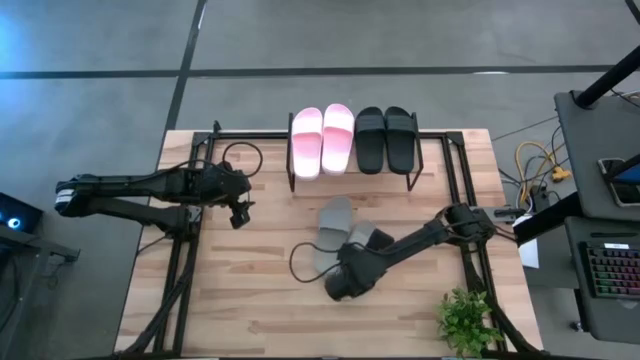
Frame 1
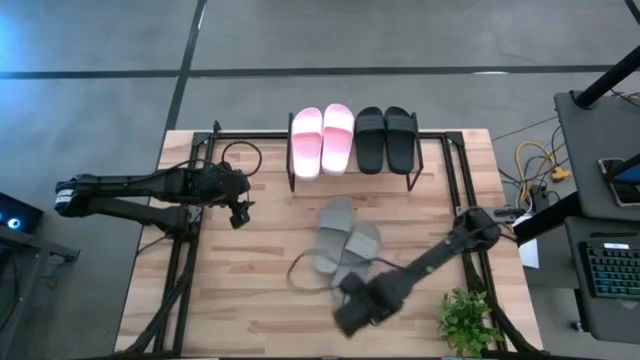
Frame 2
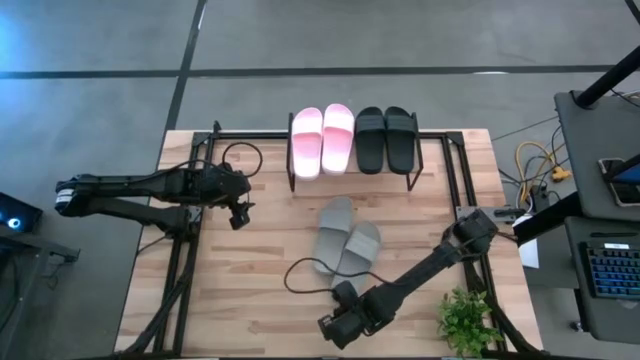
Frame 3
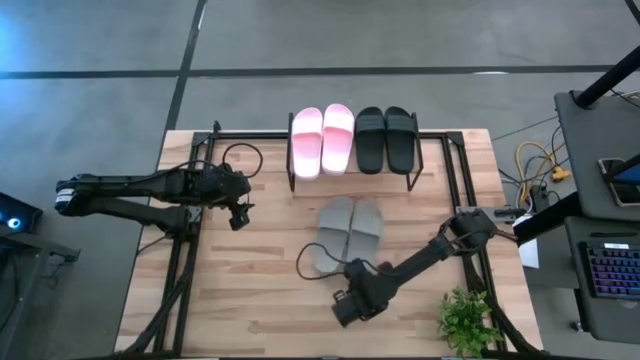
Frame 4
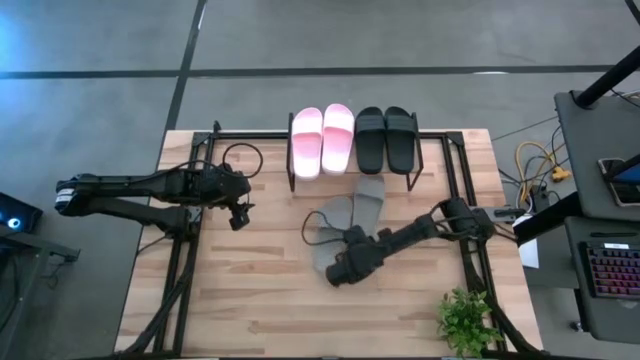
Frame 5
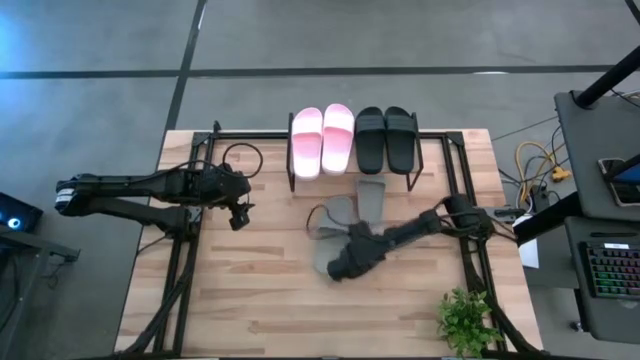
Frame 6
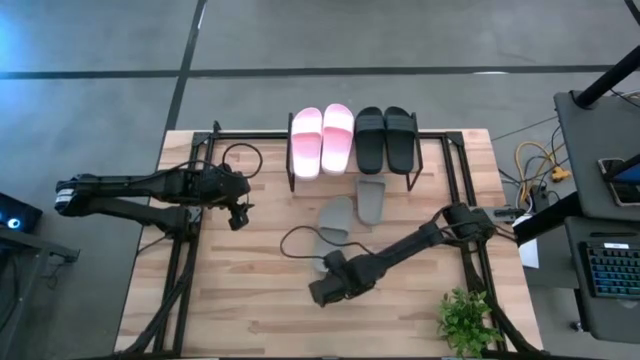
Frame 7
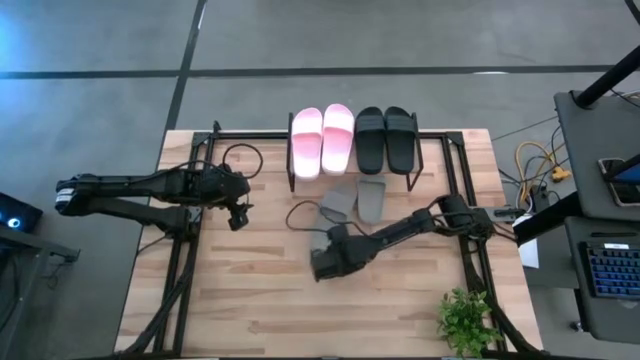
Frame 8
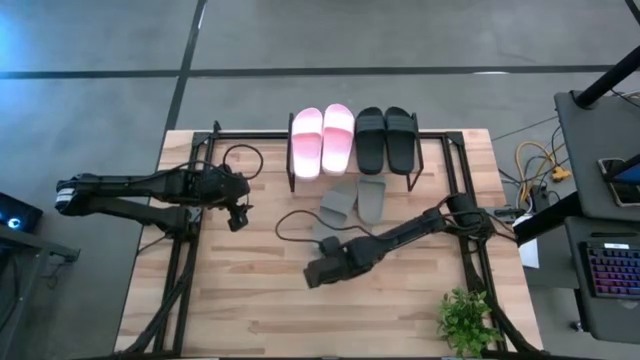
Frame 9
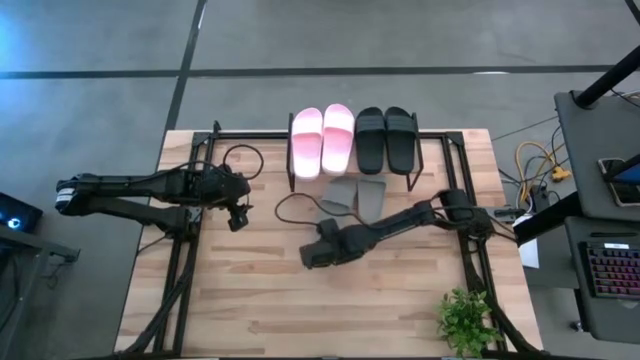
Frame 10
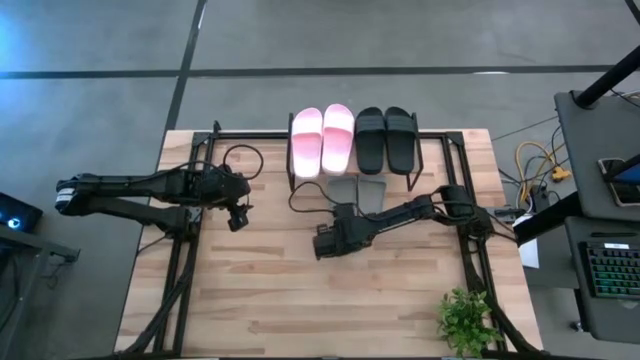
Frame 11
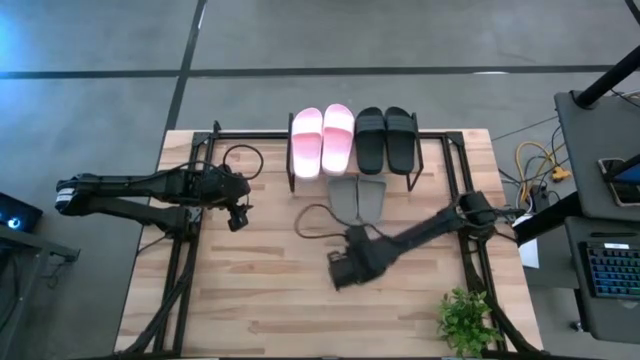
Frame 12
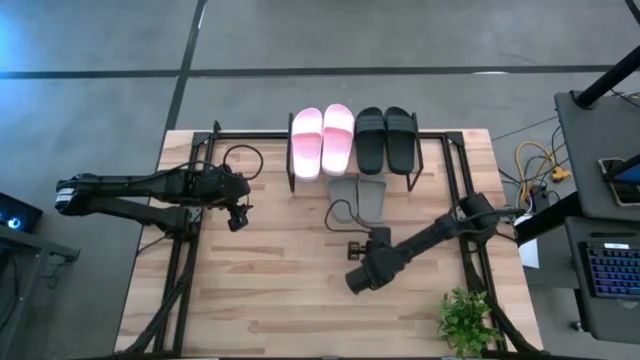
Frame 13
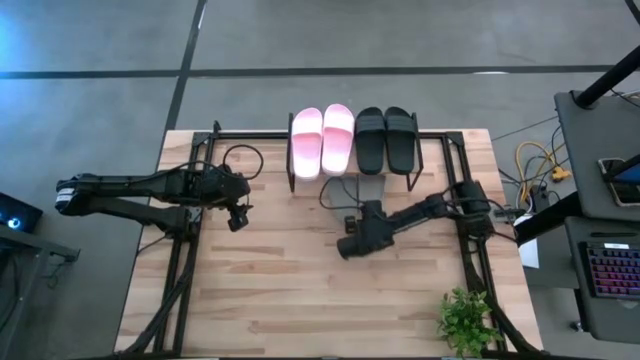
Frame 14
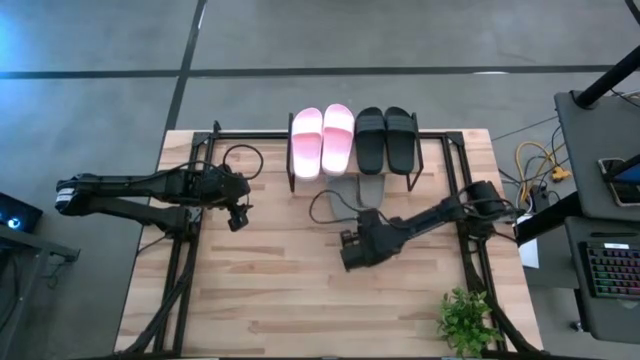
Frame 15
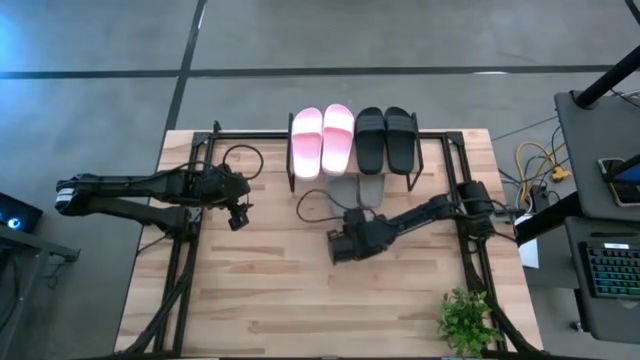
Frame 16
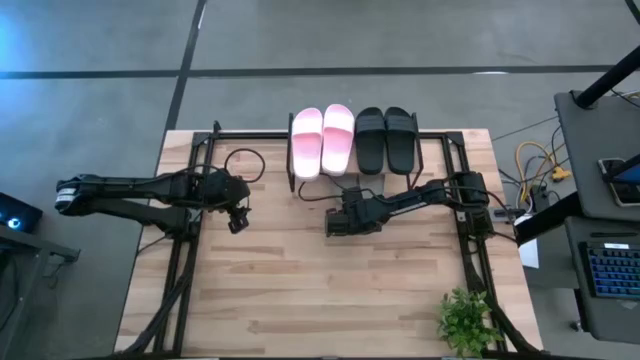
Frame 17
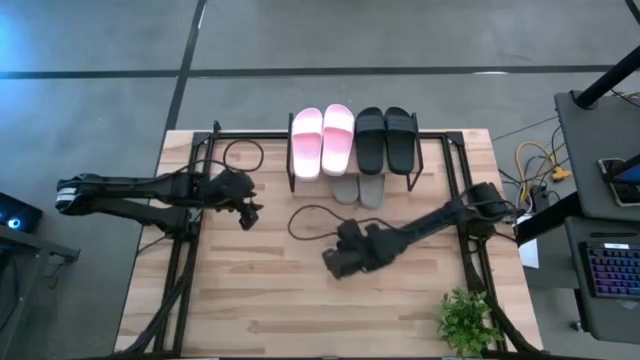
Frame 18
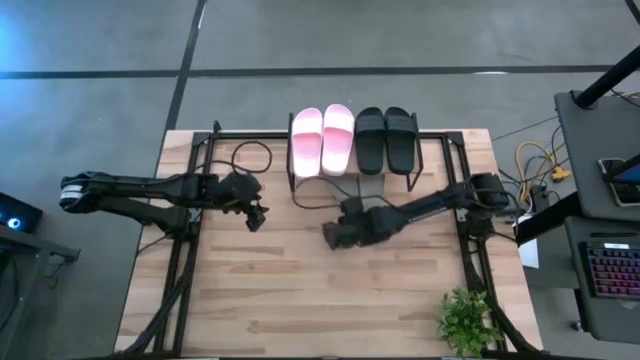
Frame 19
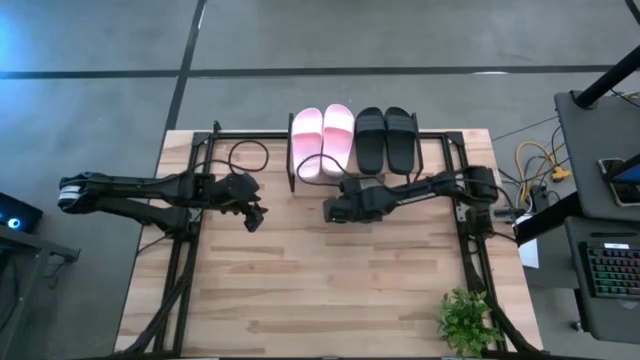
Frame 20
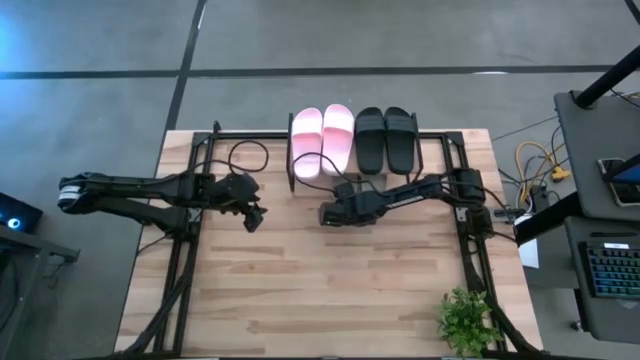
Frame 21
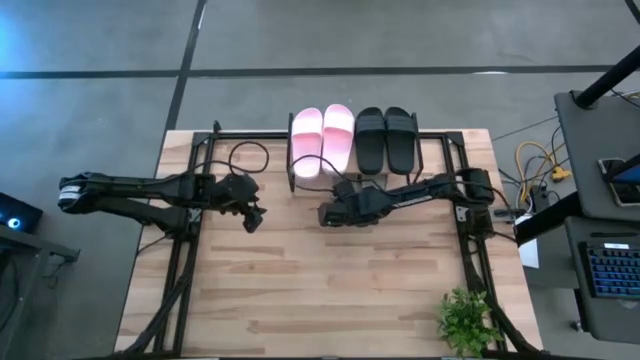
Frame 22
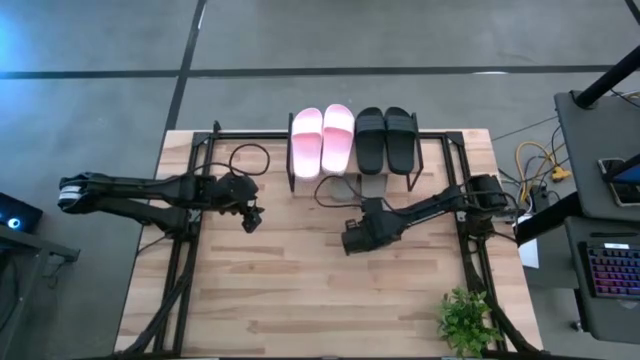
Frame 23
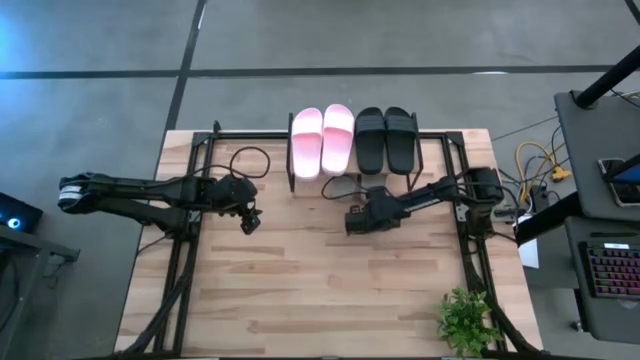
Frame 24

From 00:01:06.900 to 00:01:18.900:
Task: Pick and place slides into the shelf
Move the gray slides from the center of the table to under the shelf

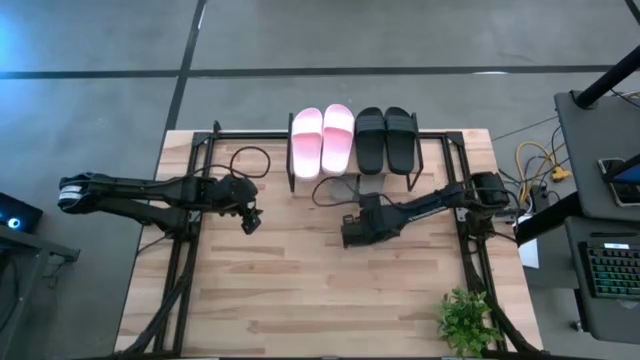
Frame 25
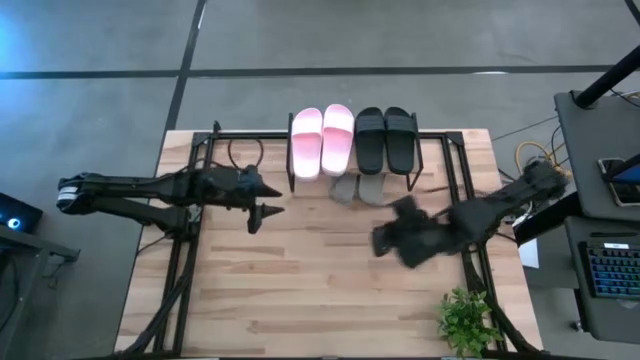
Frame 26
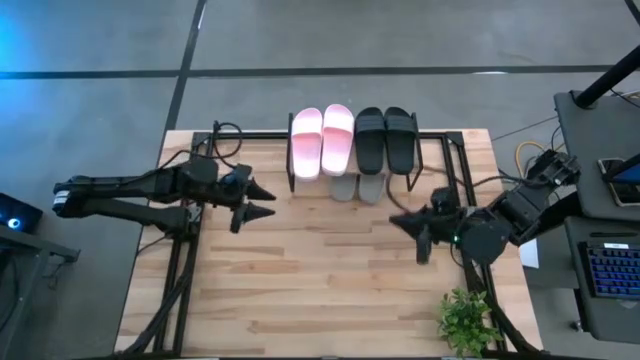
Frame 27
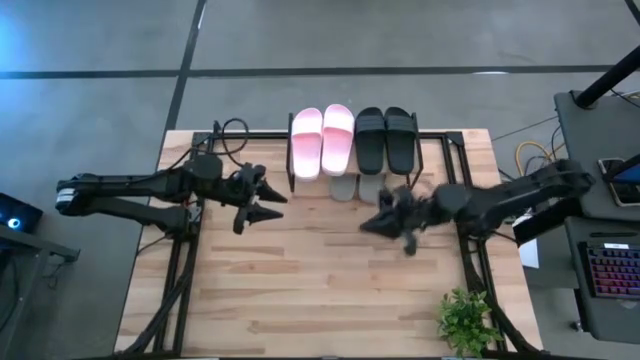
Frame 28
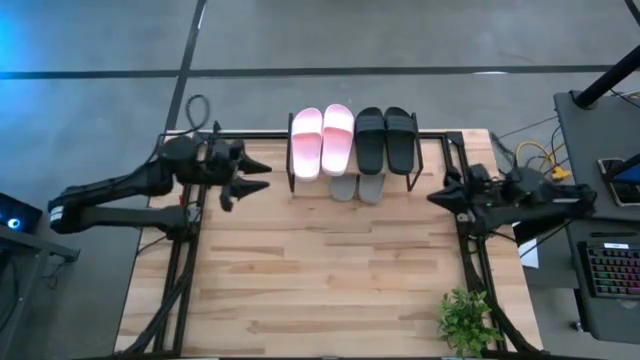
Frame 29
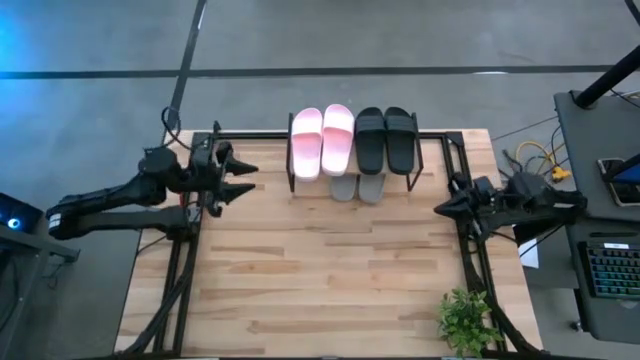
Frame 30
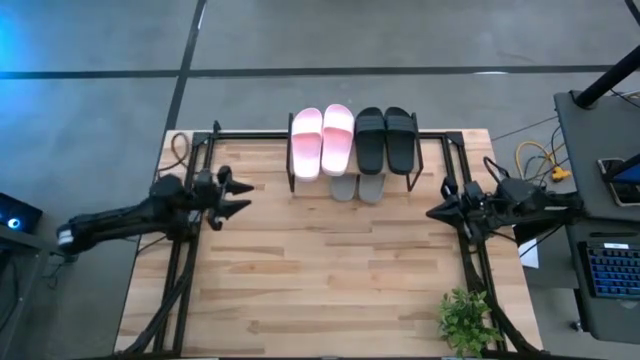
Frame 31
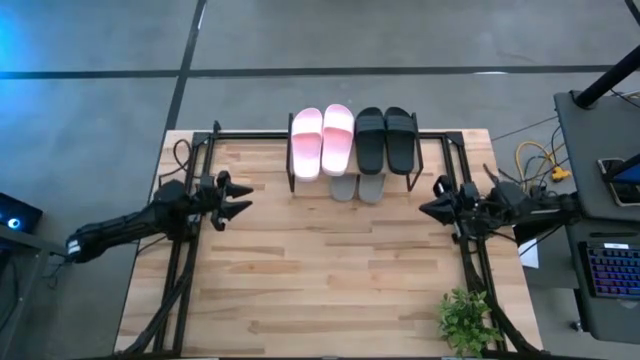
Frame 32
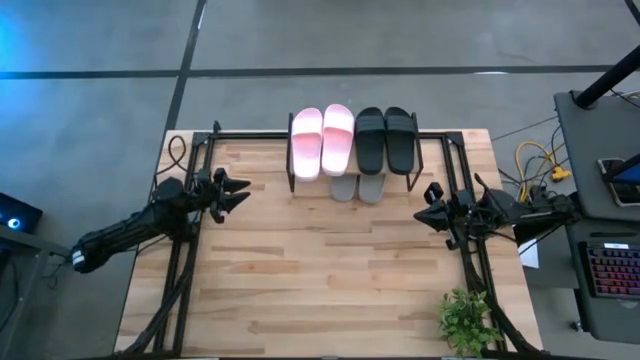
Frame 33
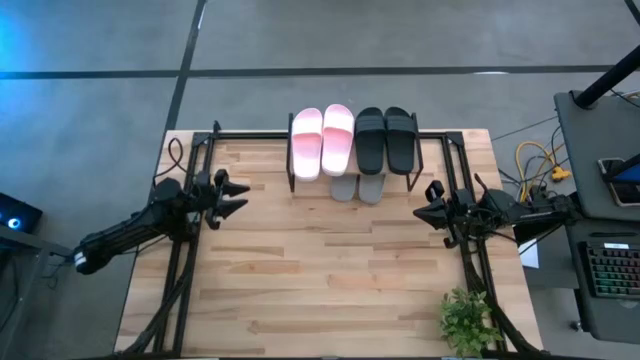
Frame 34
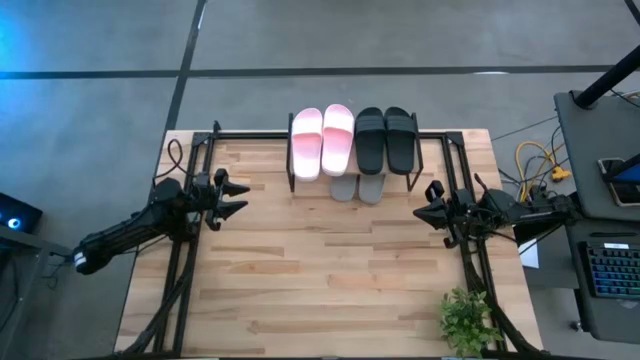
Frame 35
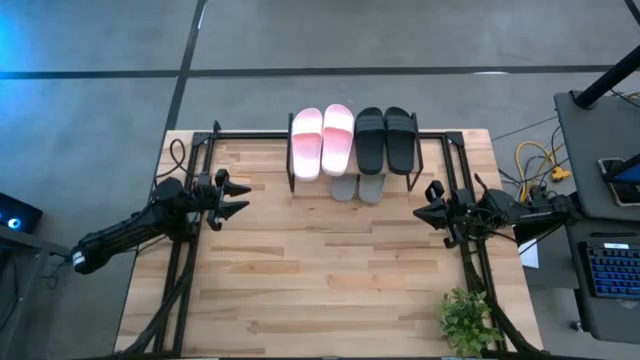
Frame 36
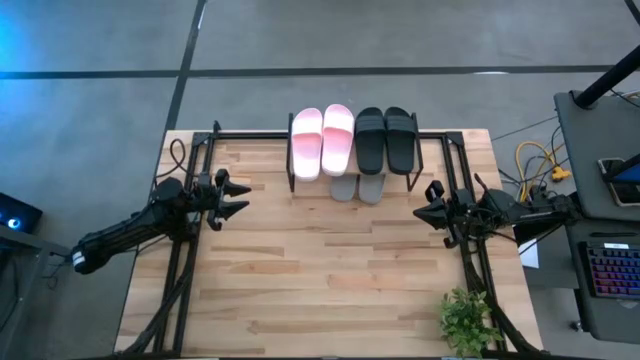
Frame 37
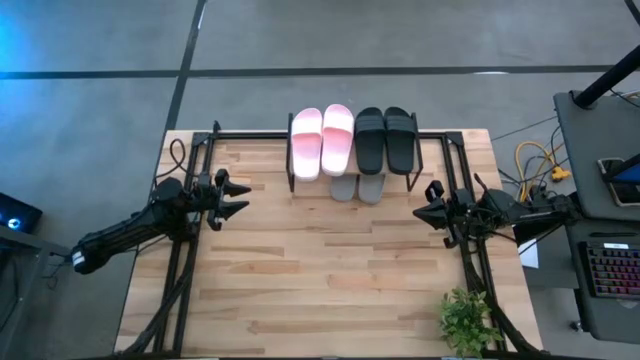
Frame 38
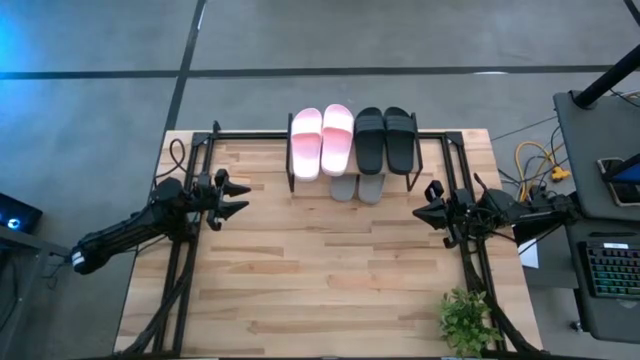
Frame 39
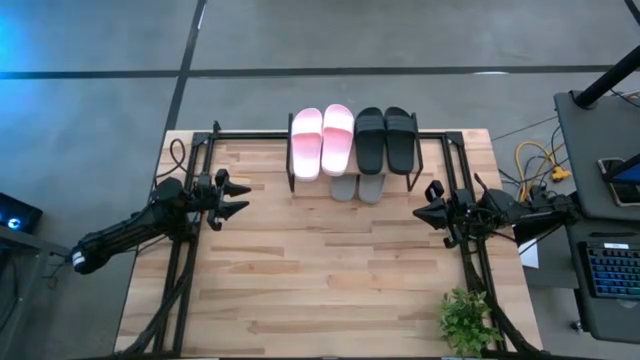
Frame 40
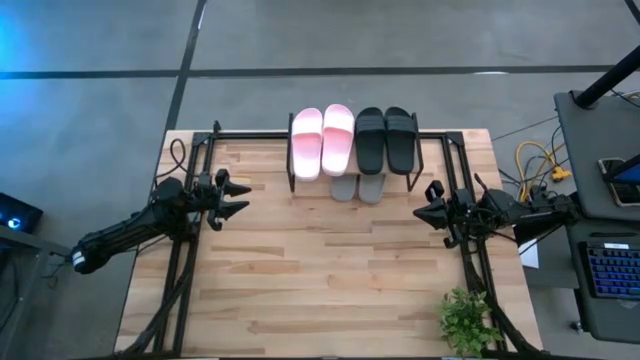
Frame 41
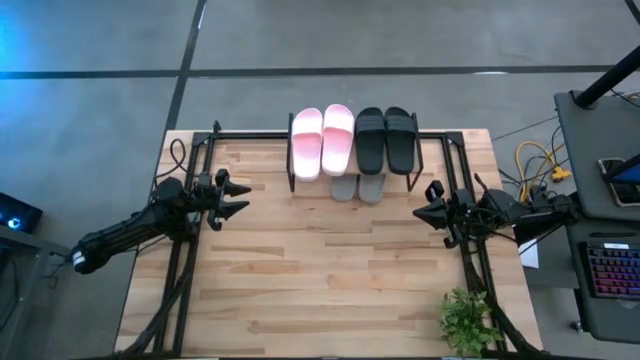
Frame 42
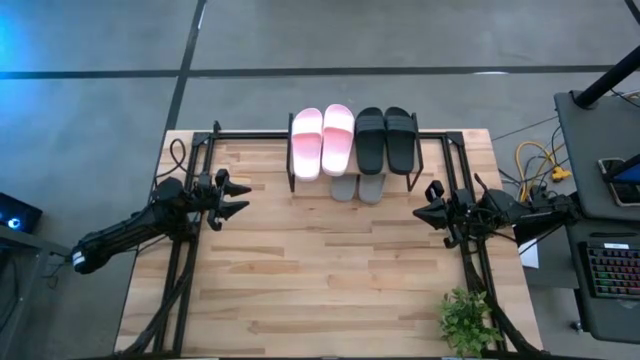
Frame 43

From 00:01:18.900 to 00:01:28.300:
Return to Home Position

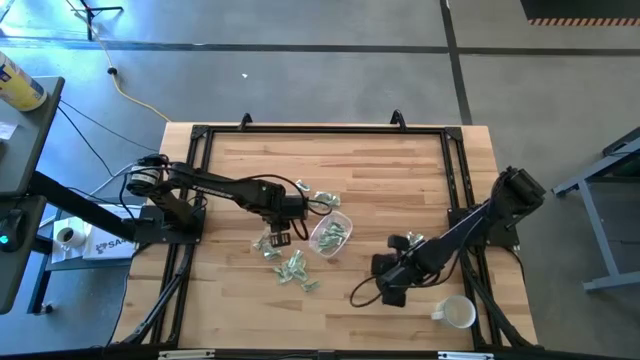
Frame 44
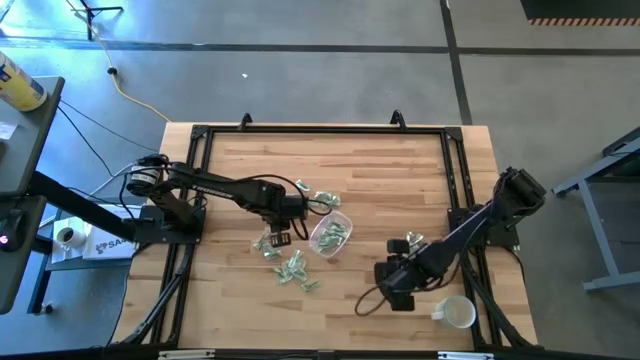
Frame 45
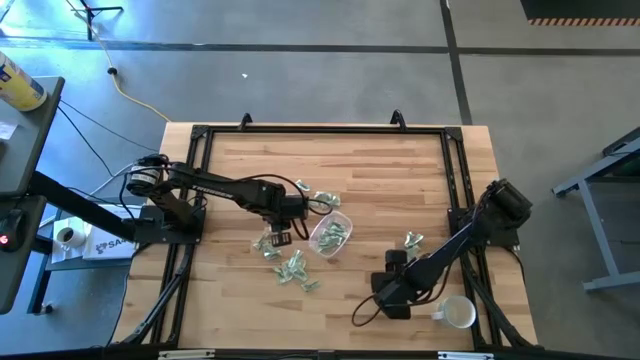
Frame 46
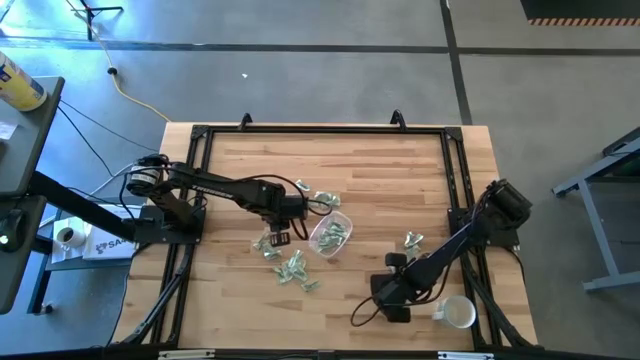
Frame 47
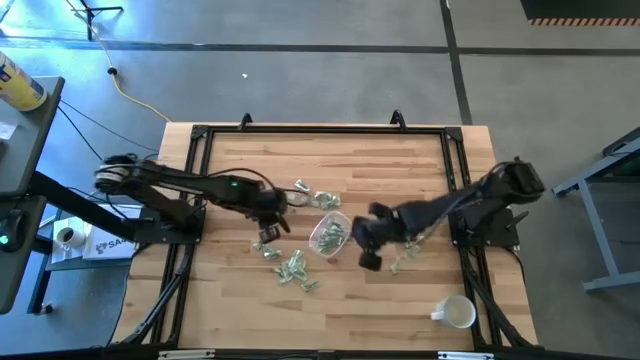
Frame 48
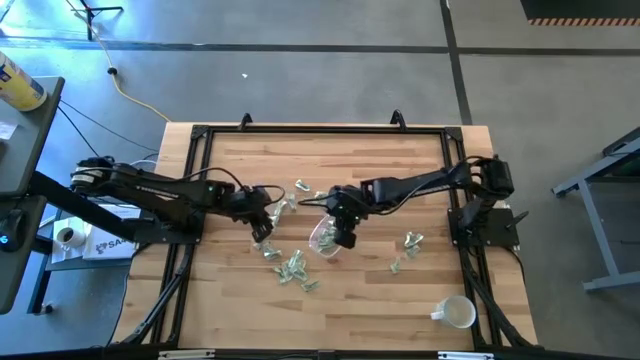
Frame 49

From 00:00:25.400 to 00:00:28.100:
Task: Pick and place Stevia / Truvia into bins
Put the stevia packet into the transparent bin
